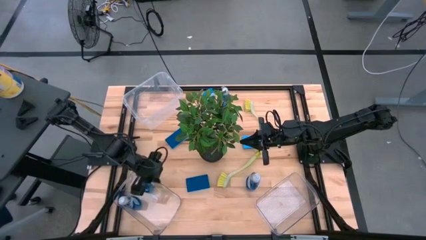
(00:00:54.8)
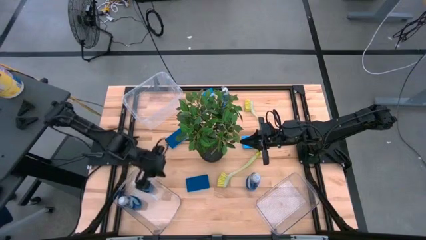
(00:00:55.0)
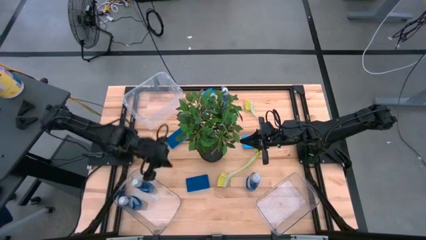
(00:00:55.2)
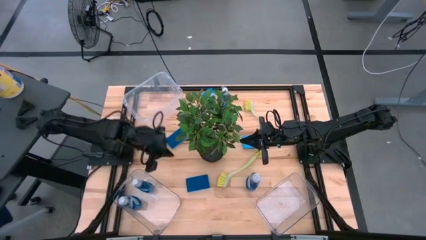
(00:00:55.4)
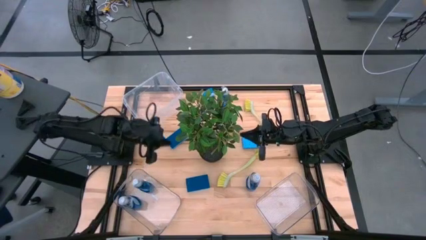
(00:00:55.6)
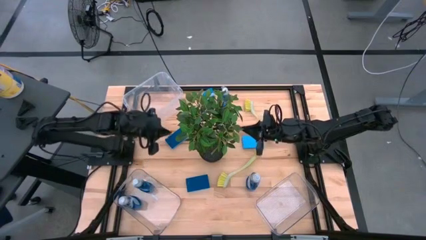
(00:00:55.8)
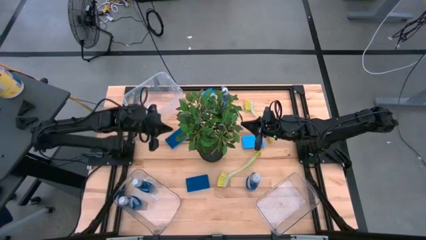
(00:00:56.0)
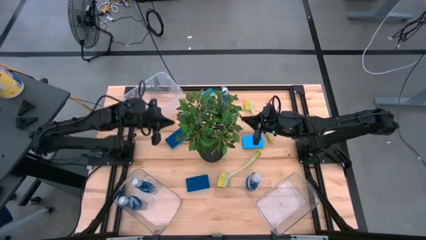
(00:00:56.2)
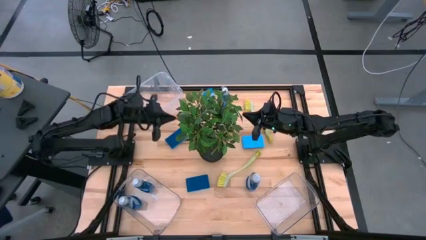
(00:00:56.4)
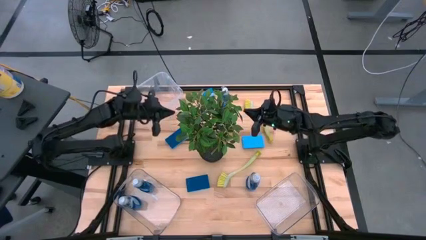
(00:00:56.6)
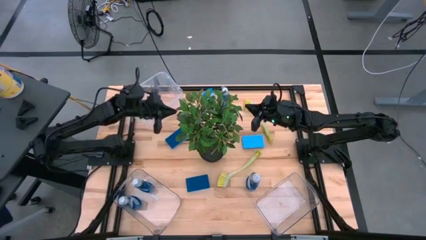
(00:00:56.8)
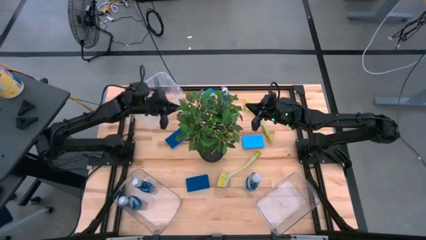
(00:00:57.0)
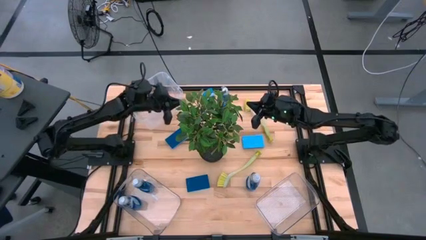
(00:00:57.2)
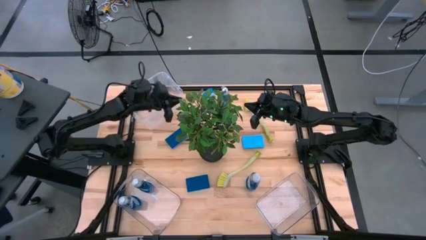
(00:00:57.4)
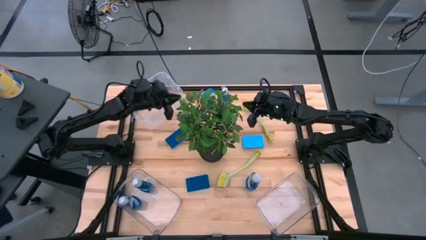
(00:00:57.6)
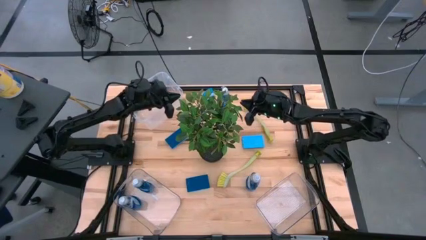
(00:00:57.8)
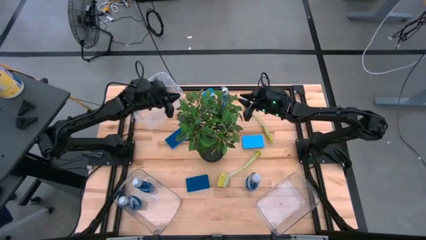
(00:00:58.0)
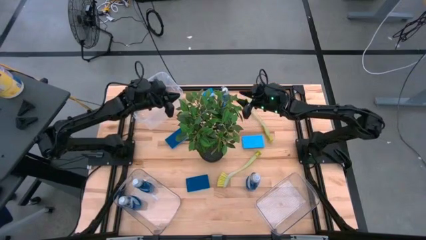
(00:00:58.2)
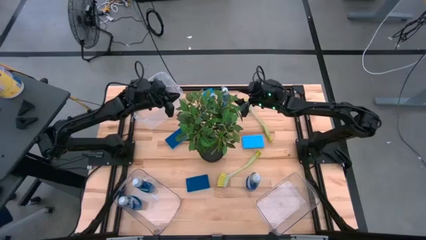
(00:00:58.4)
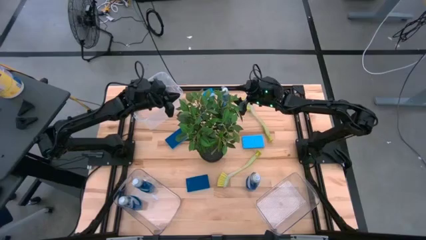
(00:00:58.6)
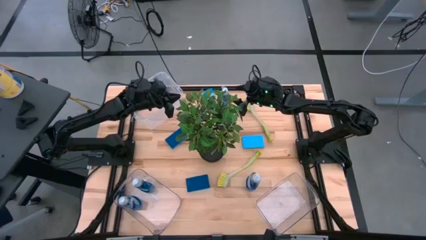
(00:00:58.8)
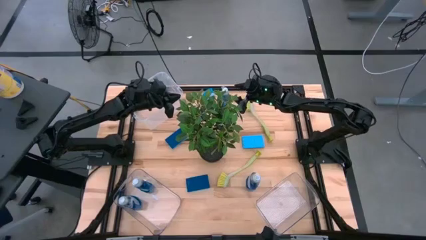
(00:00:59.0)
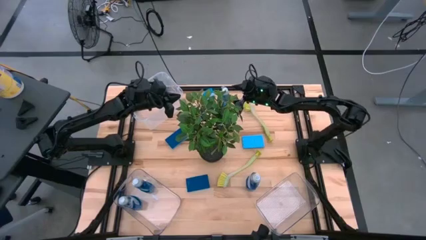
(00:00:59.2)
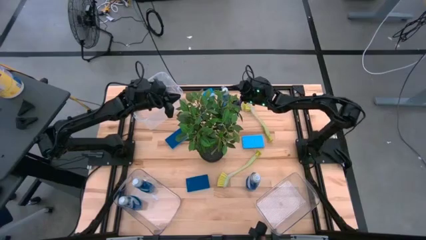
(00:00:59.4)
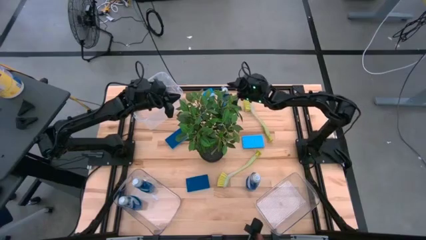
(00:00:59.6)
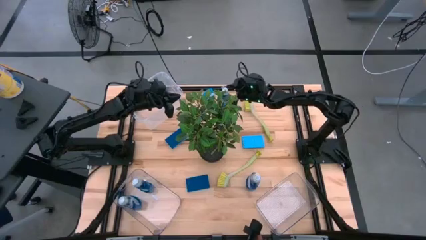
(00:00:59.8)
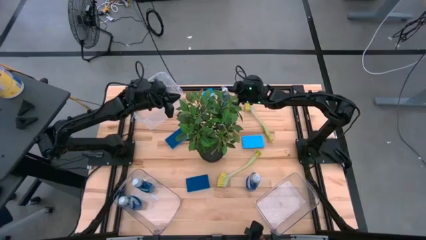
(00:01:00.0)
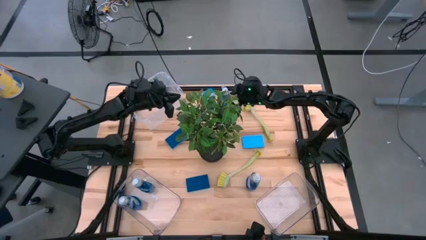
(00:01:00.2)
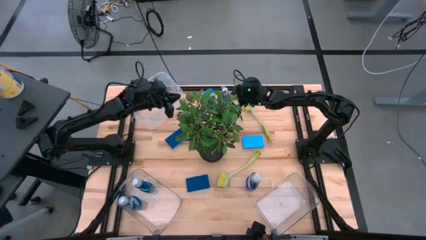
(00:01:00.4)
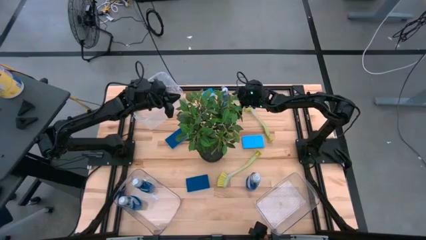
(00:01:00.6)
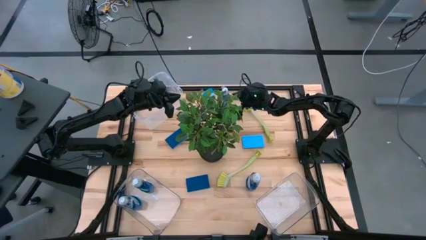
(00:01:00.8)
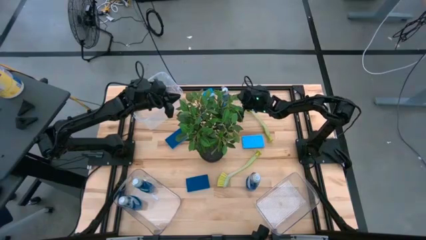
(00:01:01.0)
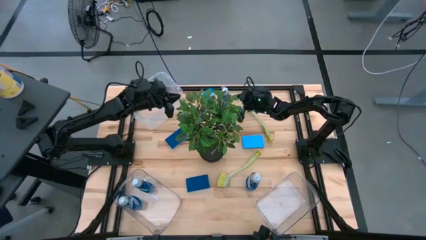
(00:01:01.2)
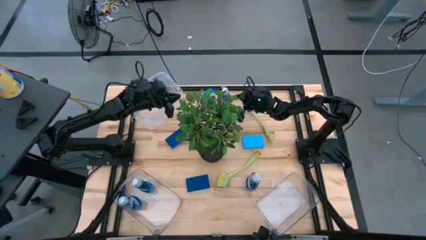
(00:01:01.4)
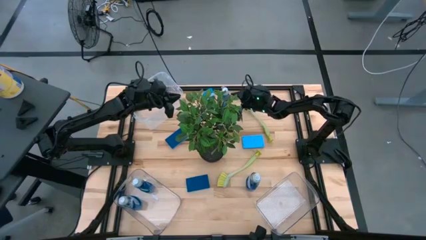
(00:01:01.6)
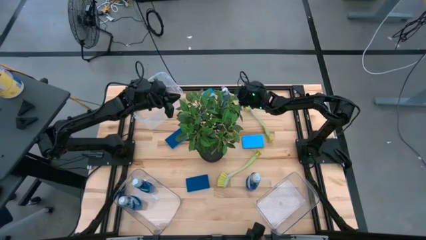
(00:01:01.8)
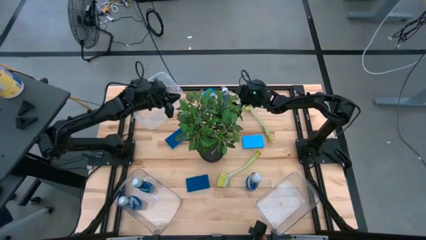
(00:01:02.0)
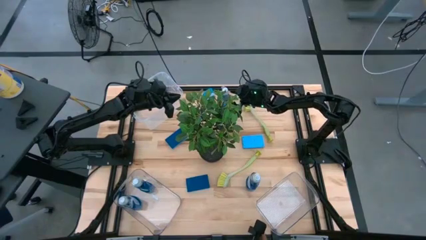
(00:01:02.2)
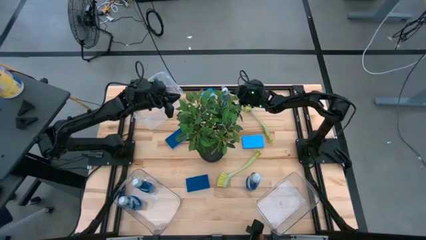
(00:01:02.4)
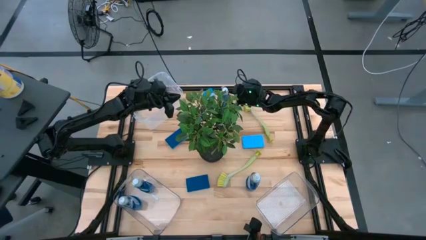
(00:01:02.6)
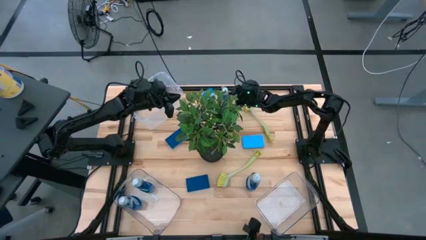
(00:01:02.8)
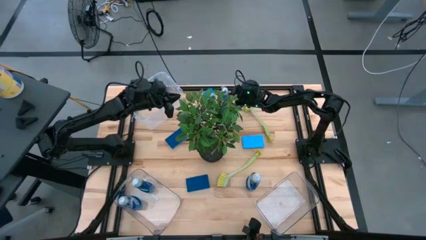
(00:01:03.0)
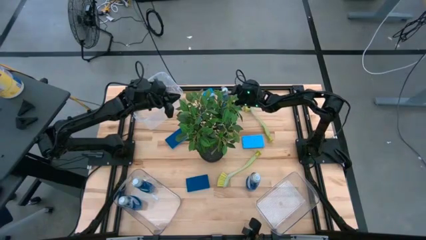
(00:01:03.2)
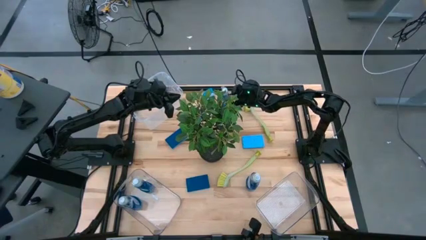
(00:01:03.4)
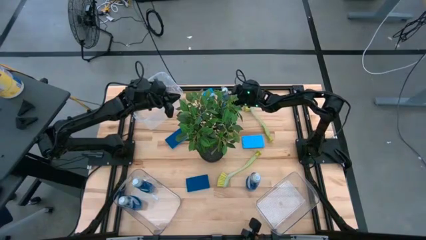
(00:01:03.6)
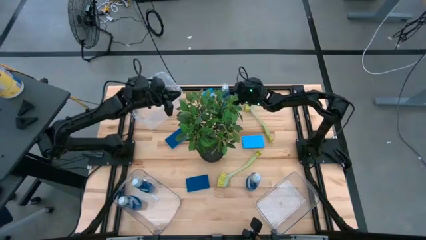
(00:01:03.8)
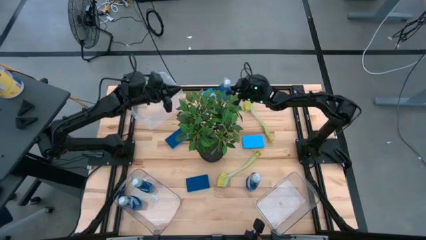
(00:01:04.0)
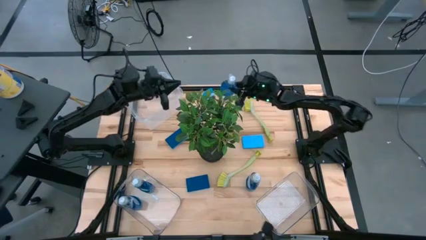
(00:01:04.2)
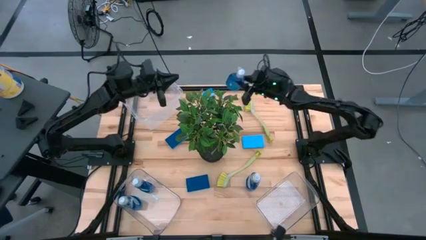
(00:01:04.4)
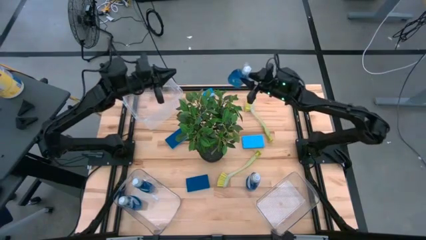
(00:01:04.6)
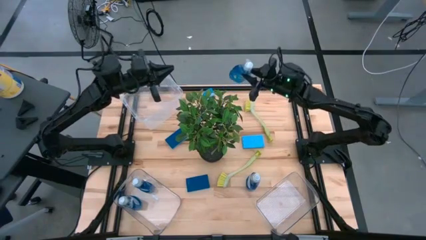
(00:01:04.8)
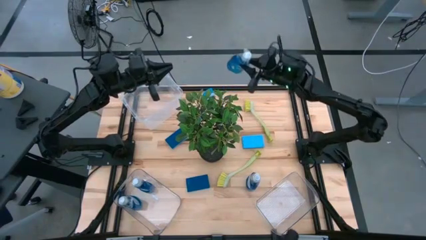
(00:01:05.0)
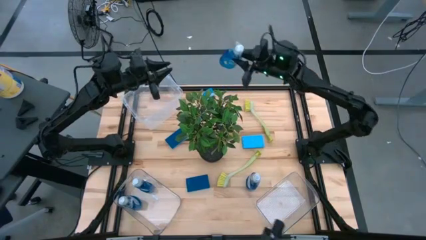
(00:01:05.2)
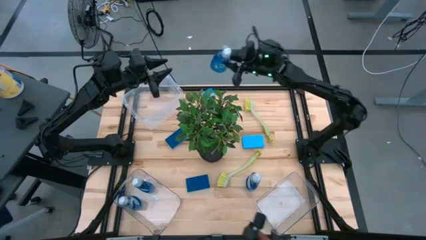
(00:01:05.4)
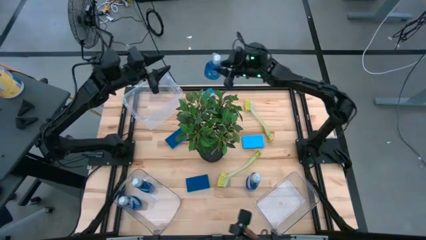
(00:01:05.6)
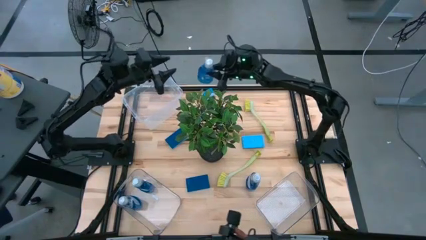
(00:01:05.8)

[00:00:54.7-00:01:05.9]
Task: Pick & Place Kitchen Sink Supplies
Put the blue liquid soap bottle into the bottom left transparent bin

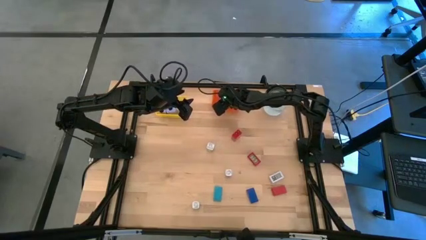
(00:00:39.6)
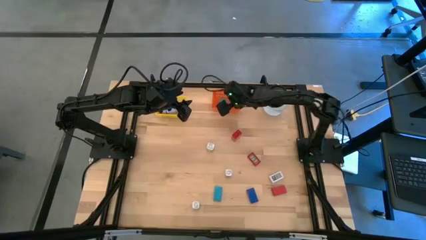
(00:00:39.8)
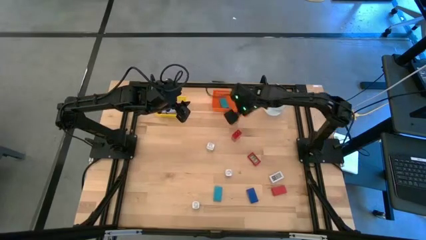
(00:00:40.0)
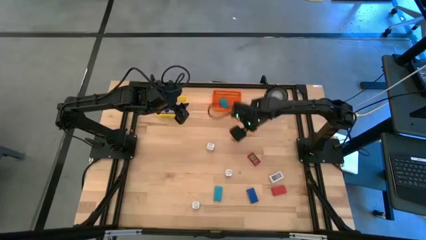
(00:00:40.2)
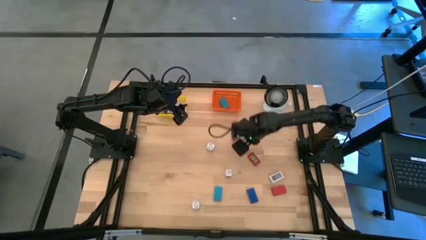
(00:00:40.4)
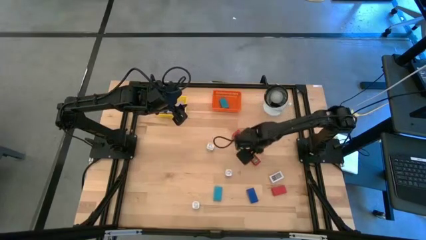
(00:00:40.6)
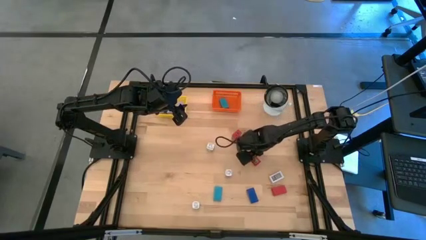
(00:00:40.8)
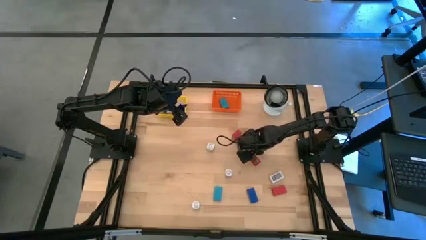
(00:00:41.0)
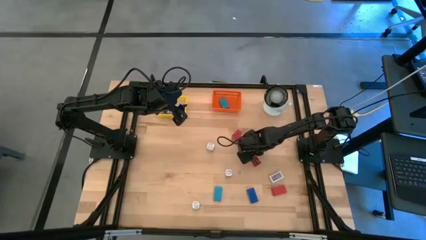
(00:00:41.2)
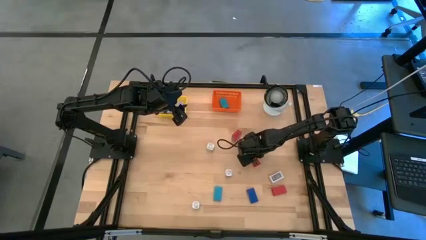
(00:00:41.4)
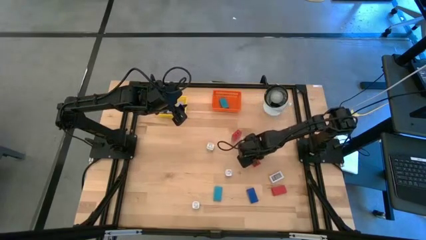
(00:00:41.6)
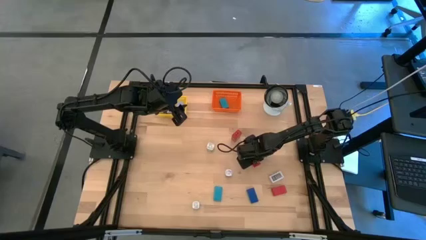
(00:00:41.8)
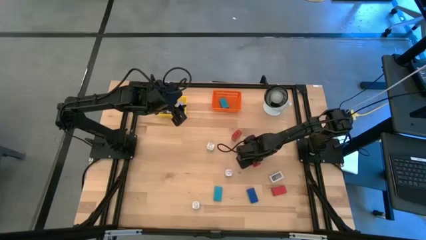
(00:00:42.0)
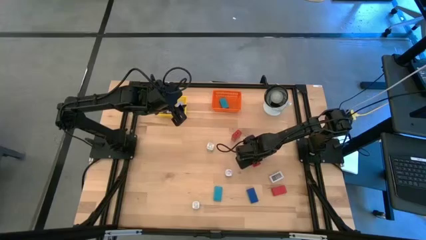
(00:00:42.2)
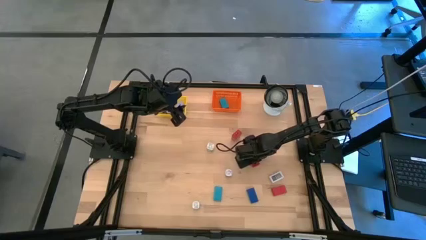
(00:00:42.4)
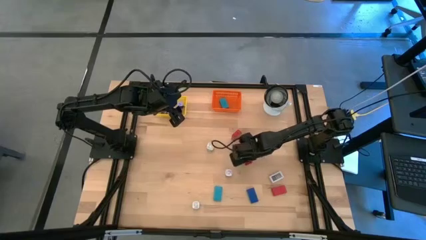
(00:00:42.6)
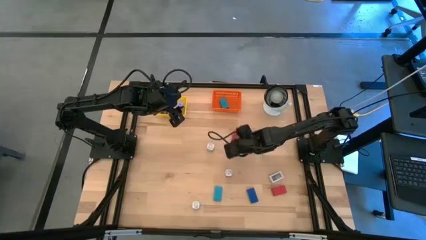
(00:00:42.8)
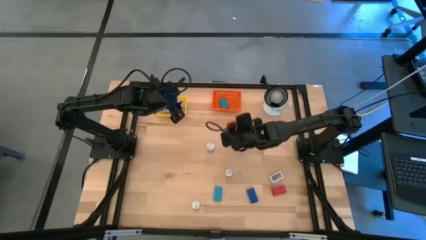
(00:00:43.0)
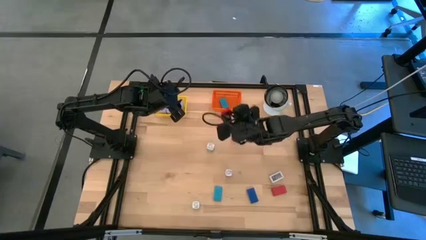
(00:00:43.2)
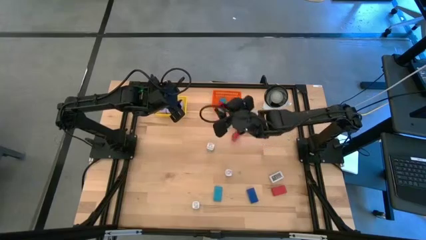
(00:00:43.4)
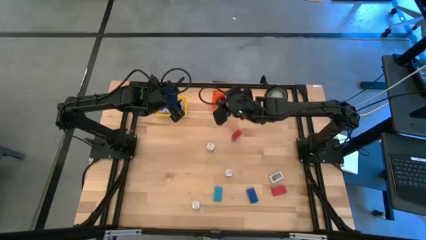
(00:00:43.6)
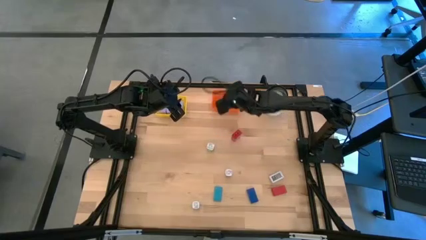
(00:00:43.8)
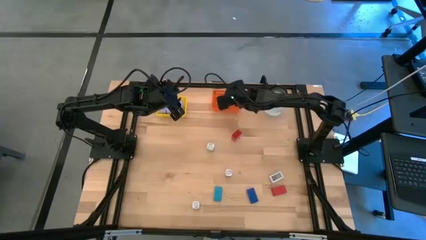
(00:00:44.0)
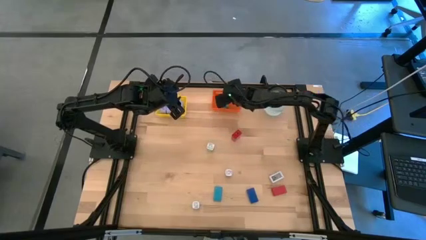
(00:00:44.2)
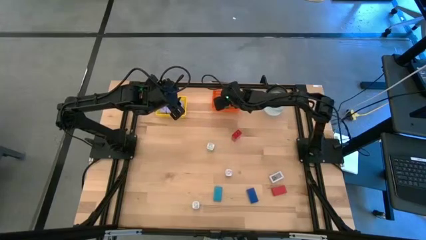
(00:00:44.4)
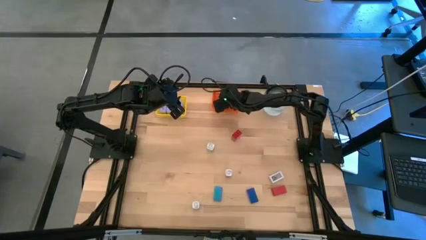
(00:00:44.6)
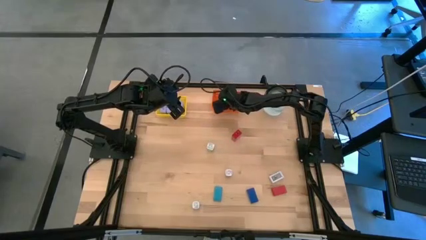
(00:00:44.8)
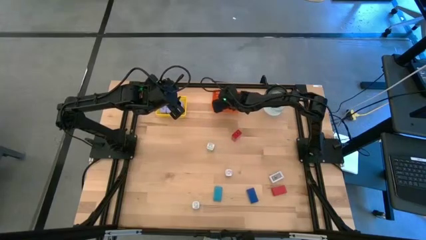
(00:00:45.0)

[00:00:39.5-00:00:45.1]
Task: Pick & Place Office items
Put the top red digital timer into the orange bin
